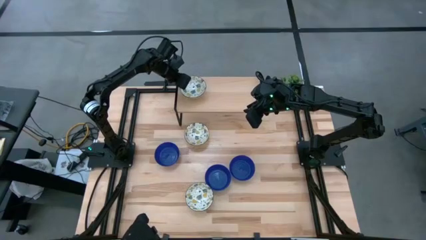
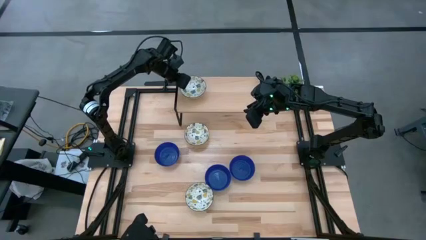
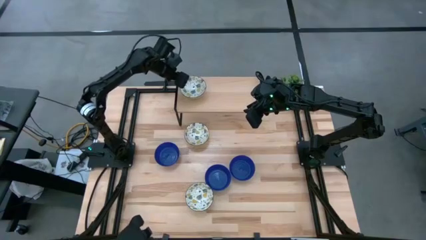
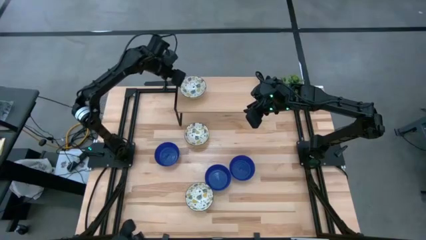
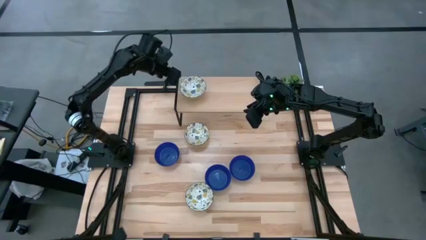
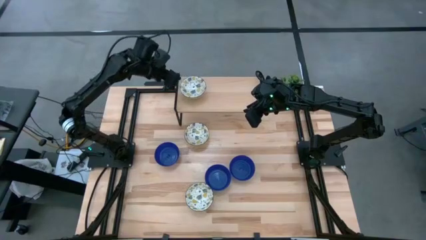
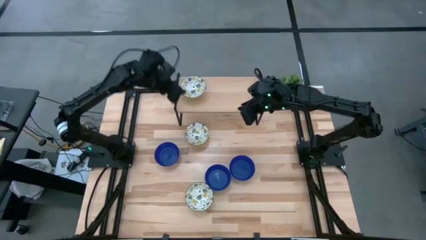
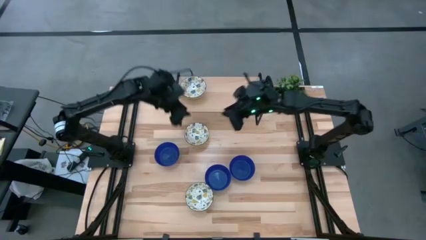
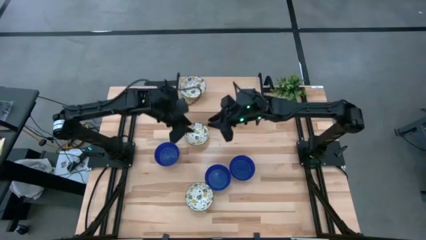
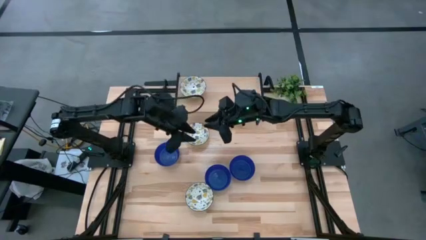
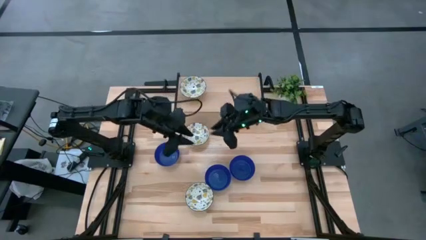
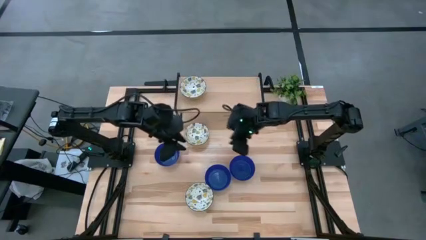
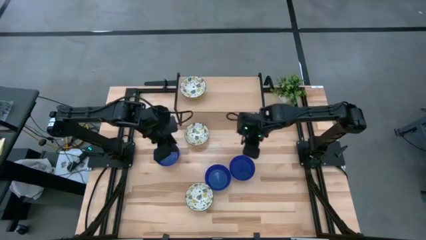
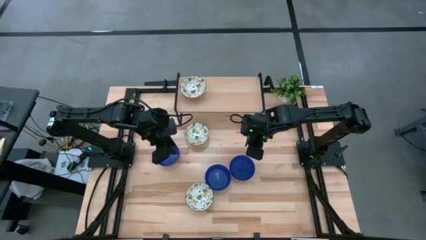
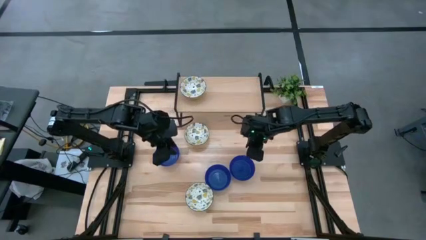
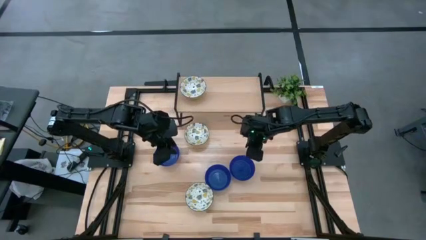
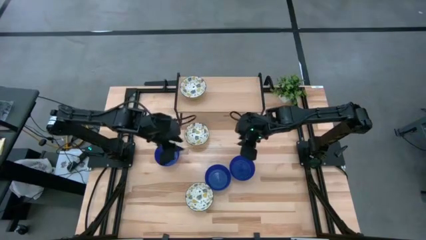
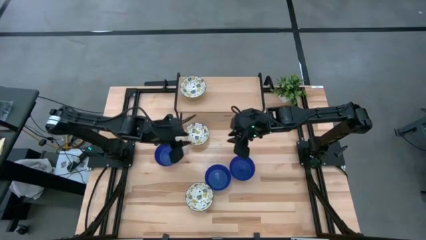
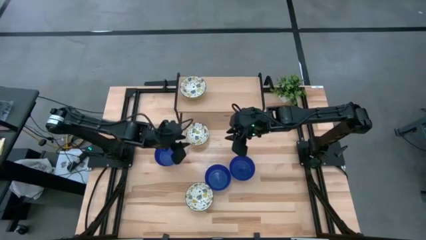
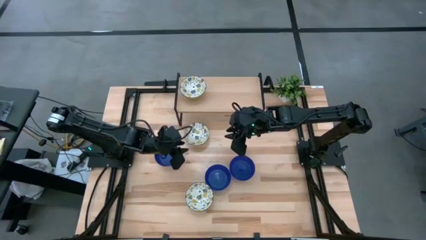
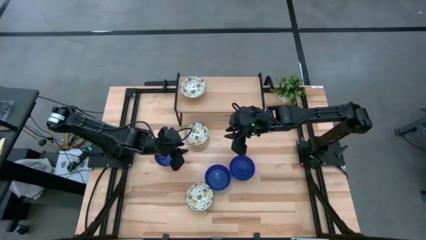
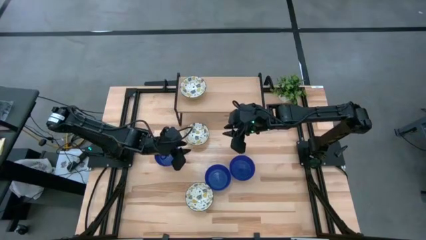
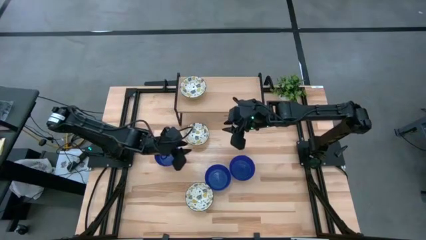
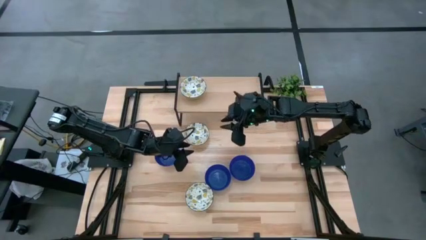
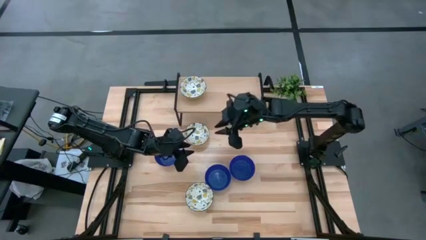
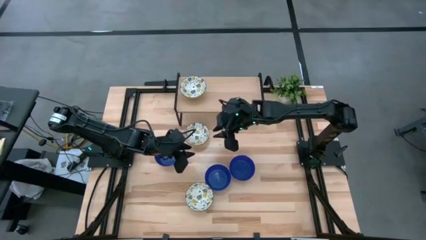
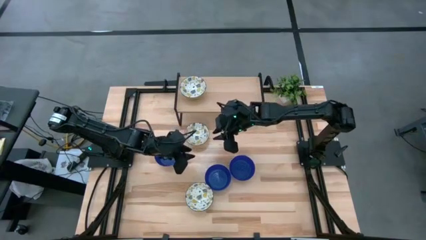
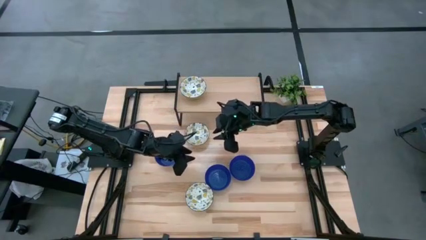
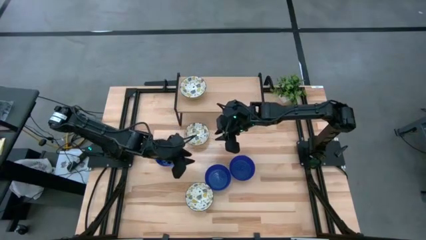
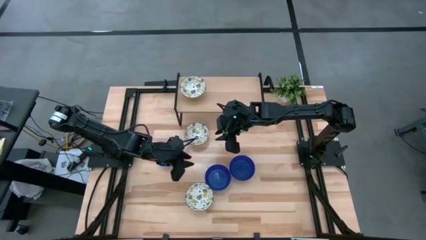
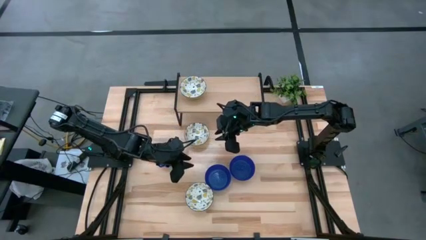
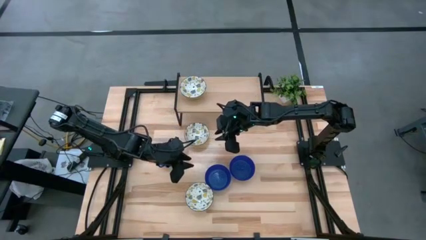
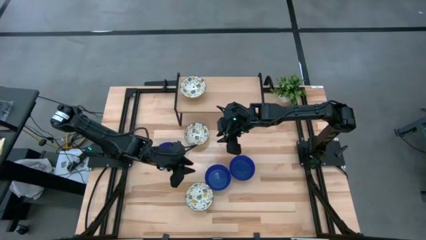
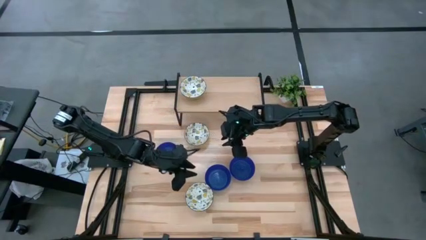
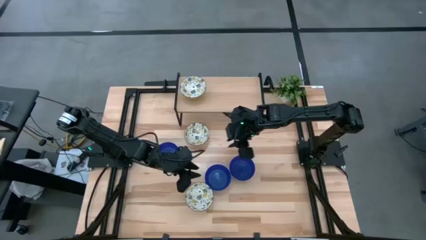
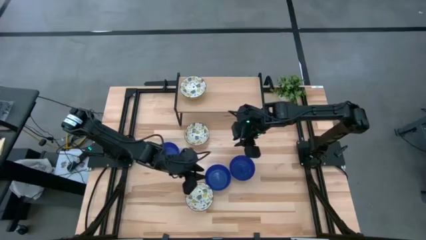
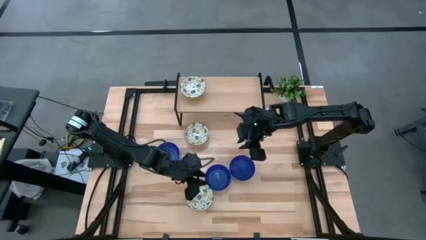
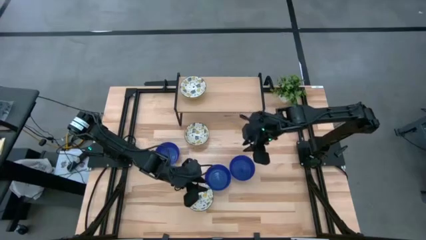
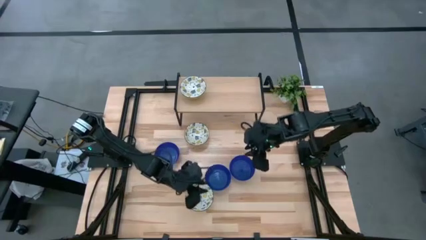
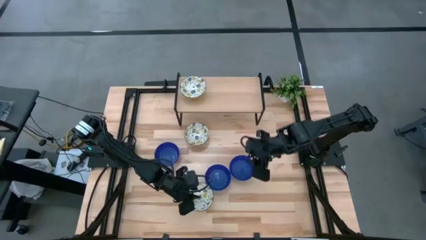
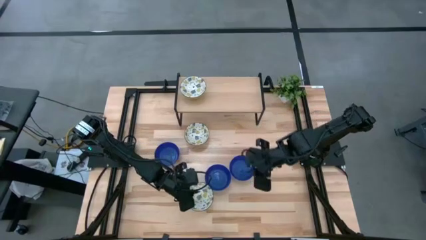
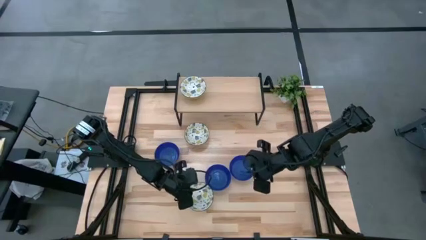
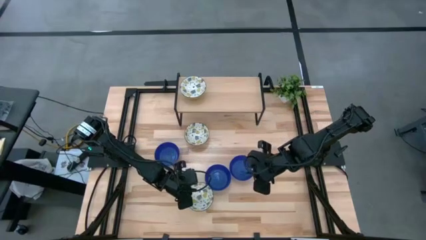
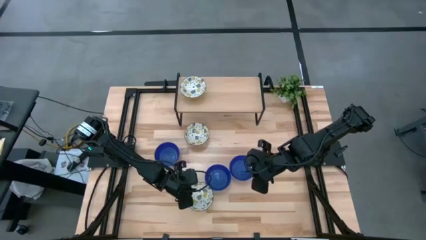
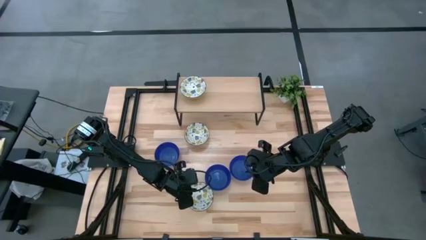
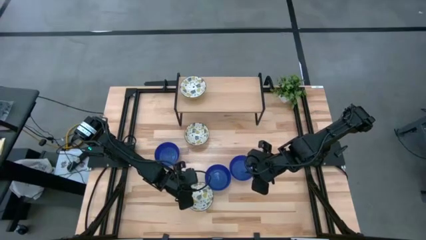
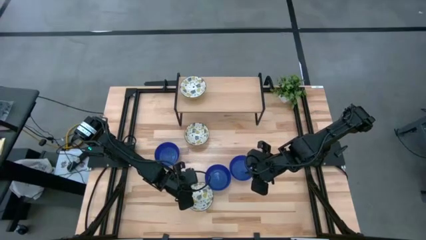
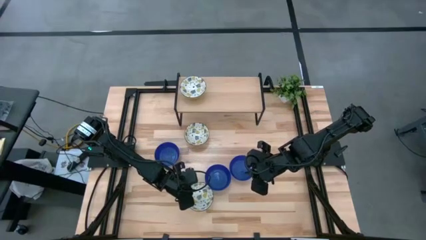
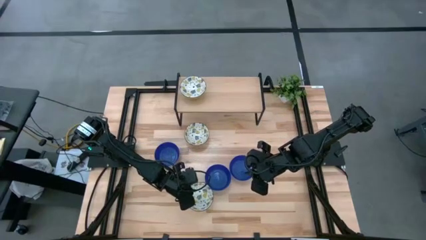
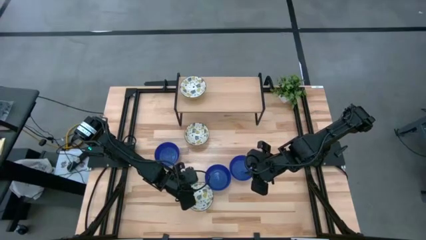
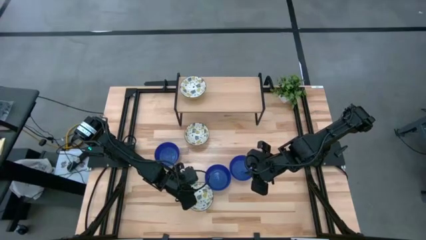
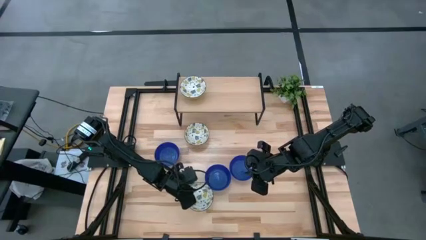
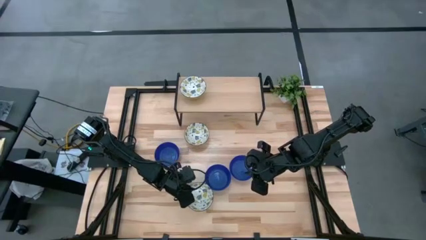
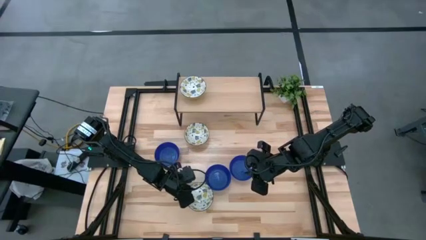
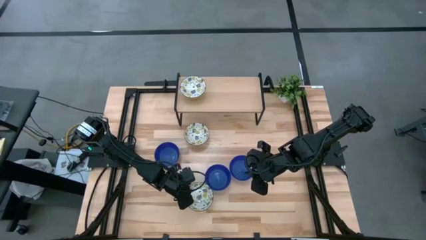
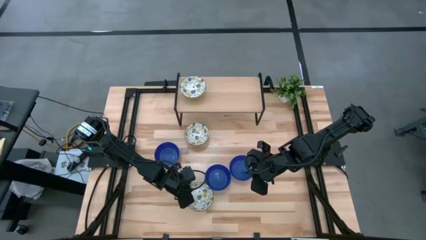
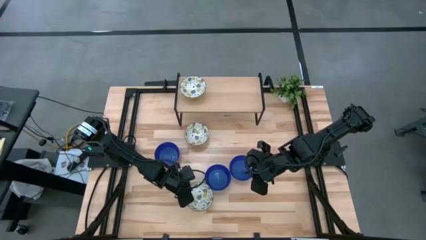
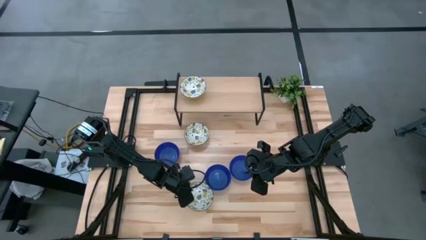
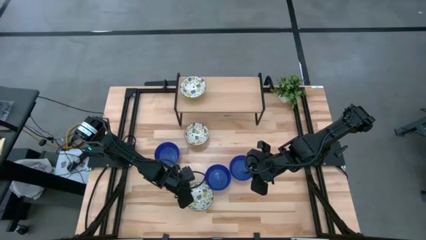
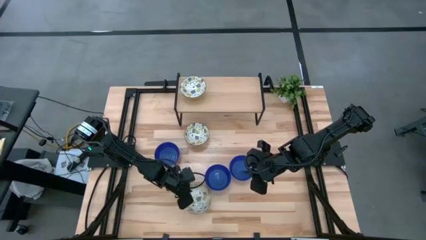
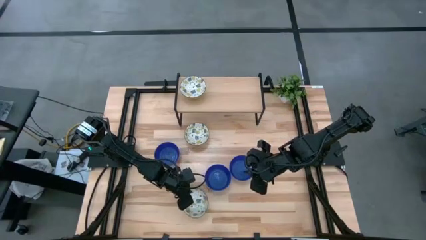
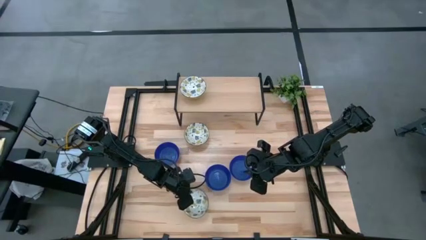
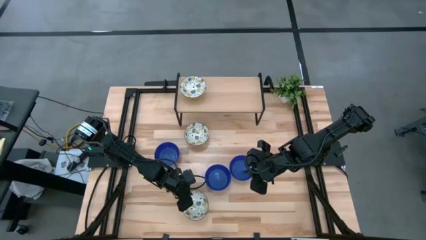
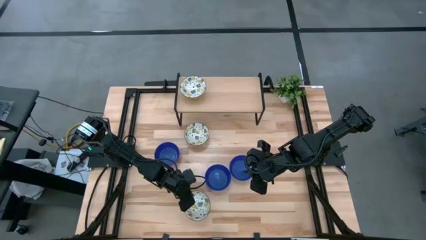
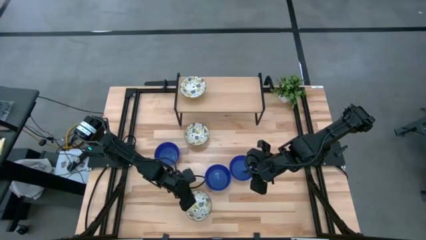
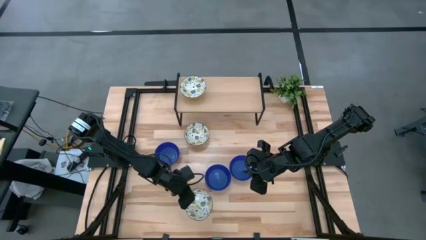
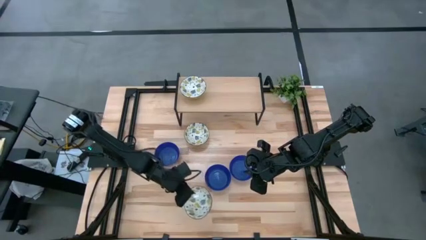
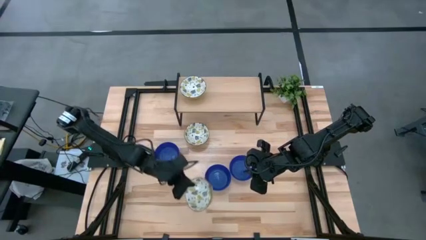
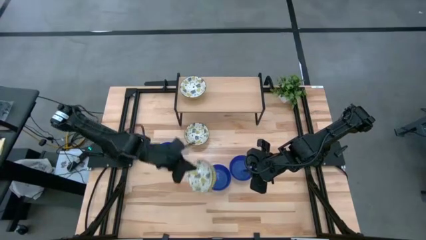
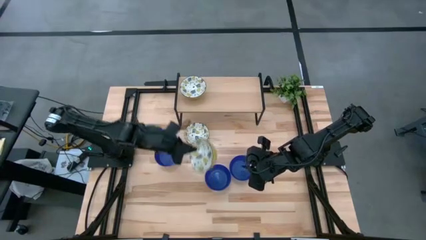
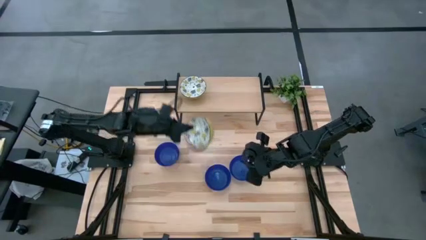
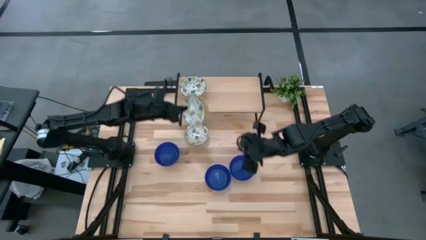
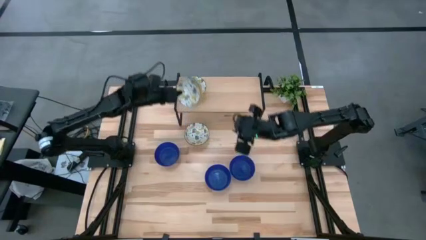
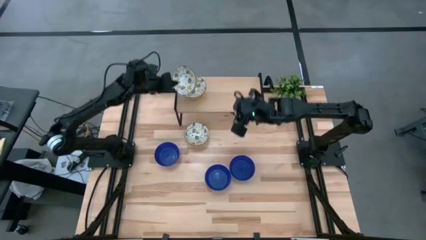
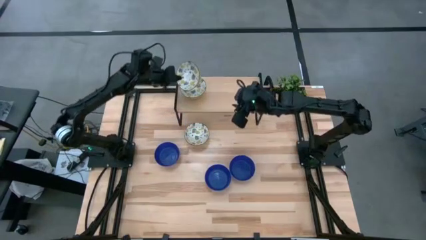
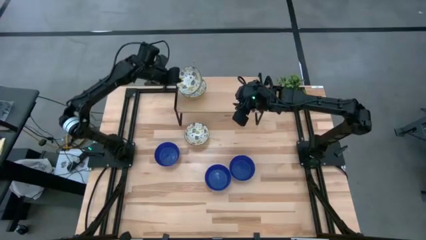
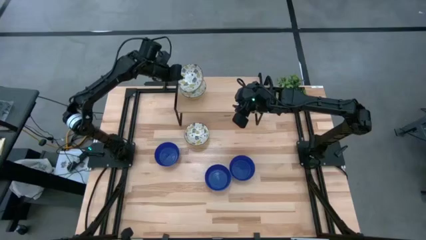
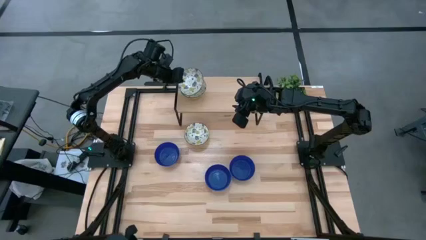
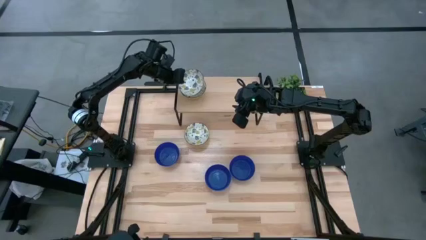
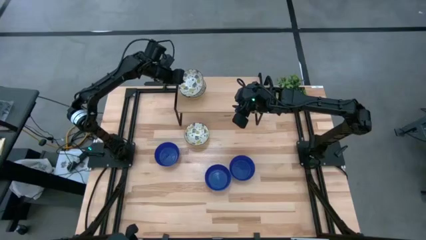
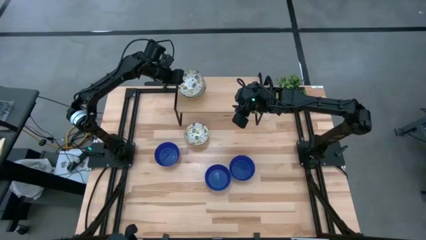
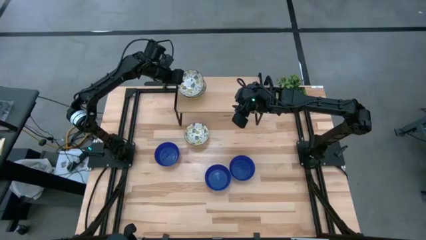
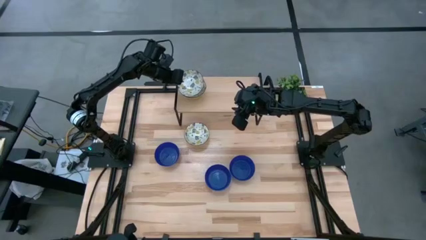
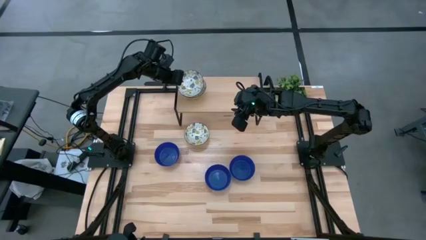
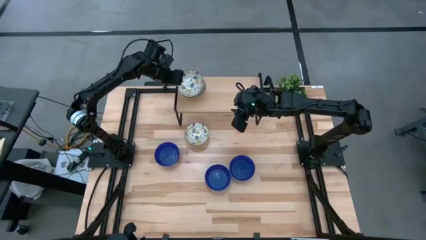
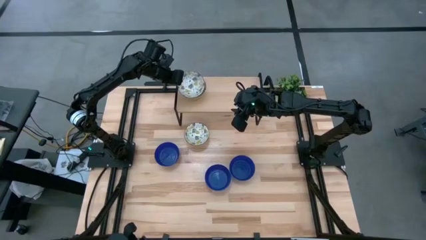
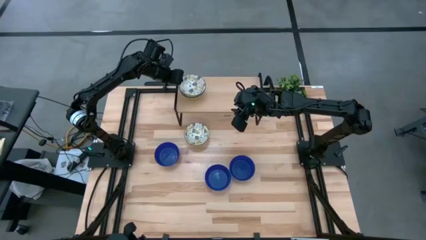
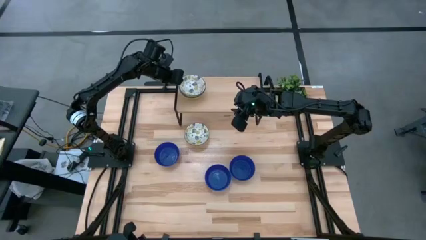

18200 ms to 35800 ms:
Task: Pick & Place Mini bowls
Stack the bottom white patterned bowl on top of the white patterned bowl on the shelf
